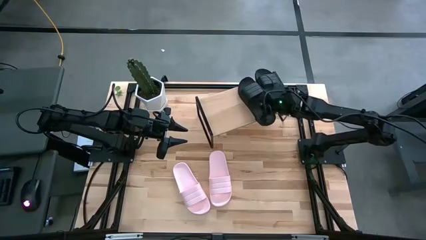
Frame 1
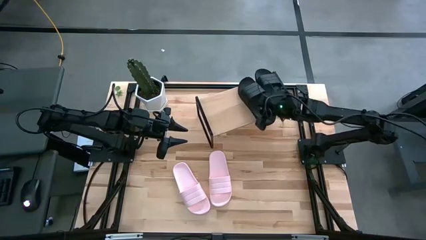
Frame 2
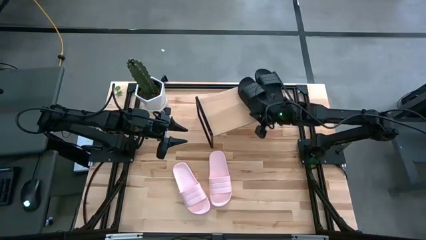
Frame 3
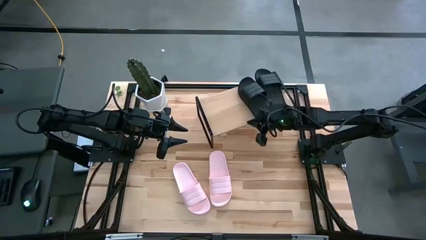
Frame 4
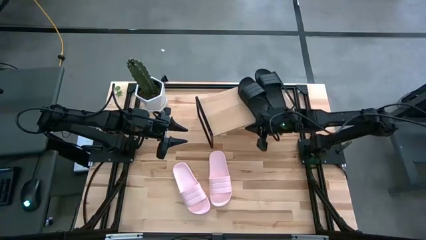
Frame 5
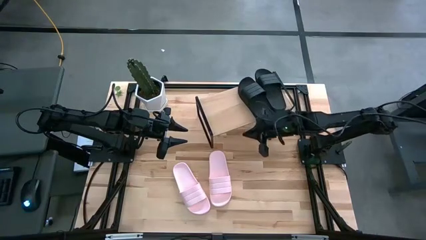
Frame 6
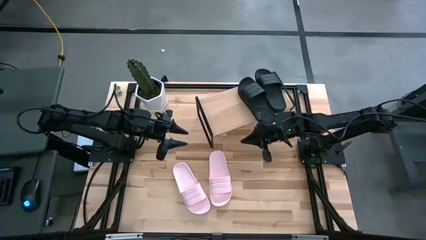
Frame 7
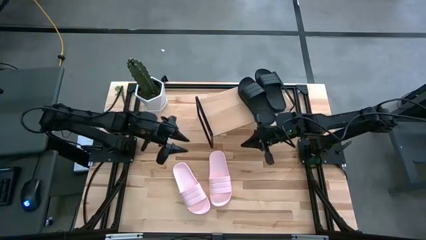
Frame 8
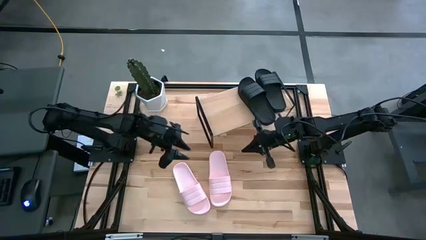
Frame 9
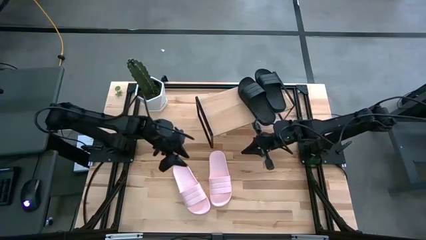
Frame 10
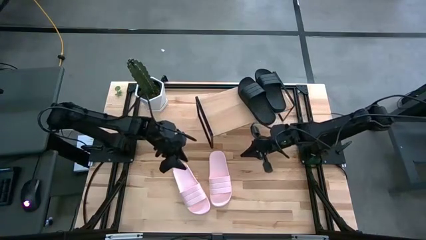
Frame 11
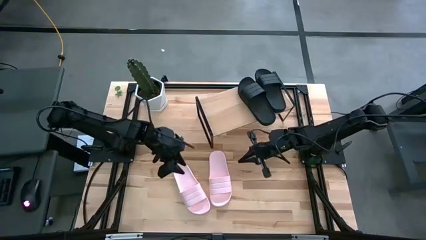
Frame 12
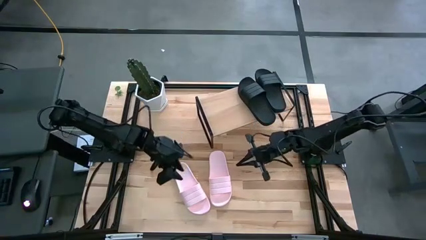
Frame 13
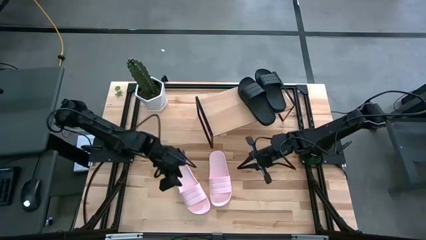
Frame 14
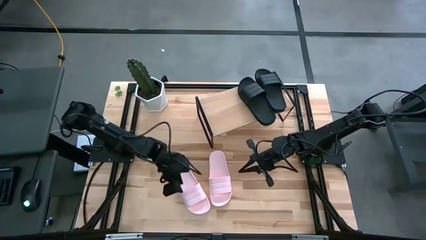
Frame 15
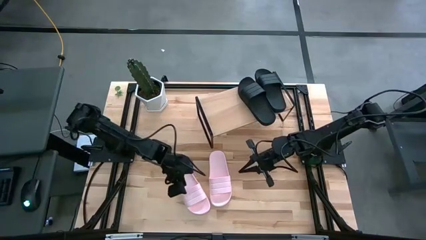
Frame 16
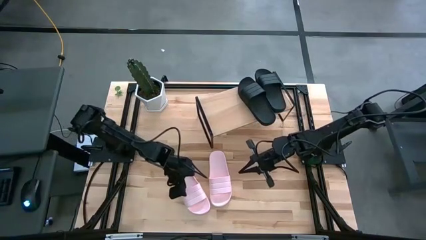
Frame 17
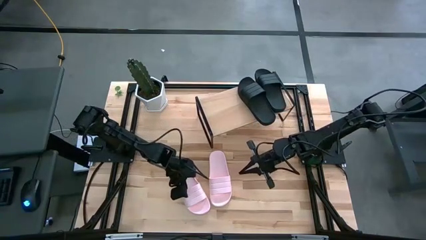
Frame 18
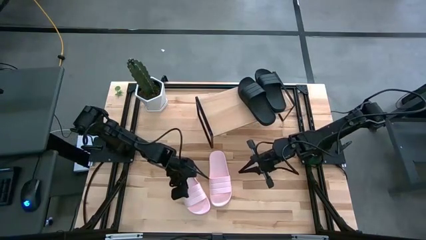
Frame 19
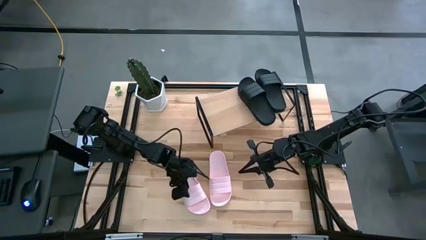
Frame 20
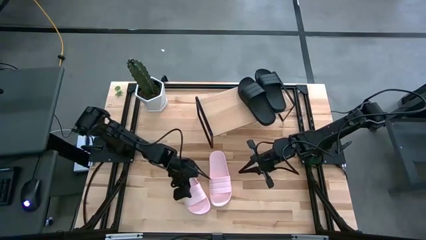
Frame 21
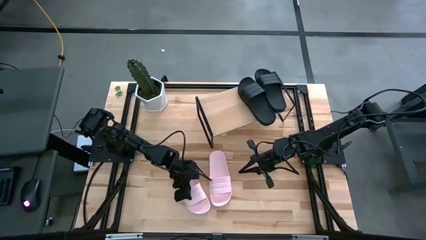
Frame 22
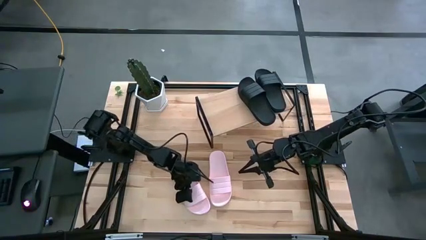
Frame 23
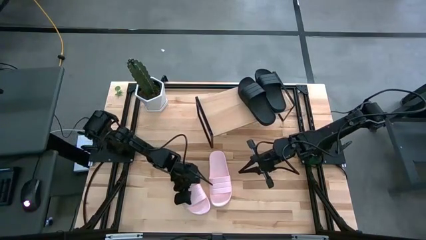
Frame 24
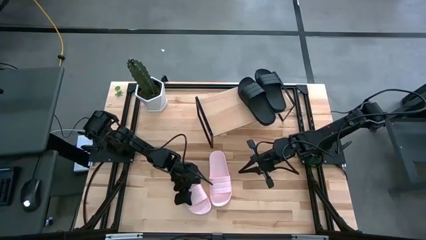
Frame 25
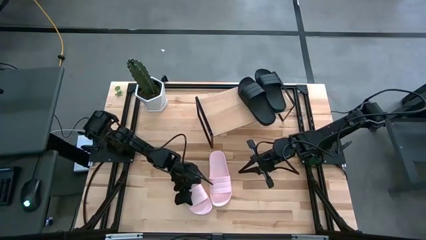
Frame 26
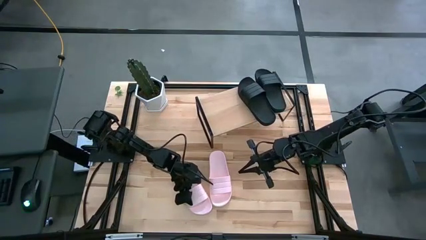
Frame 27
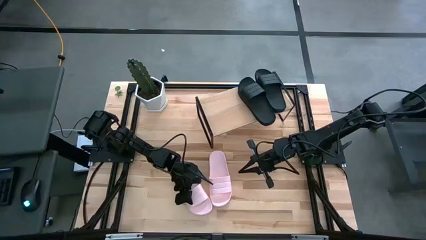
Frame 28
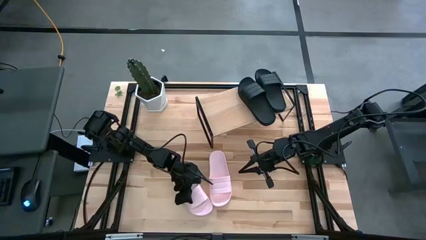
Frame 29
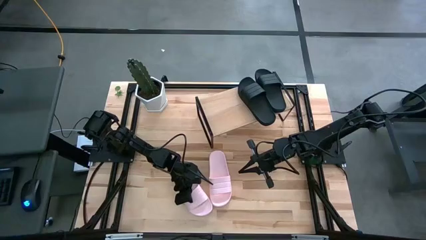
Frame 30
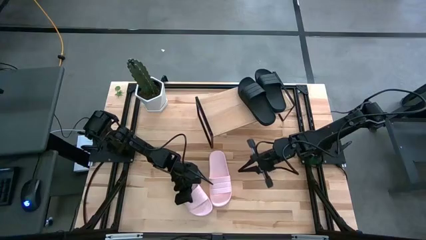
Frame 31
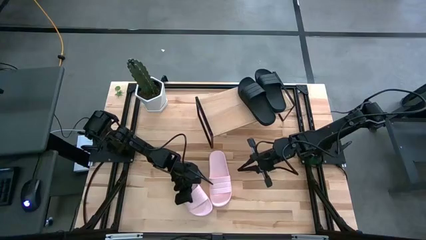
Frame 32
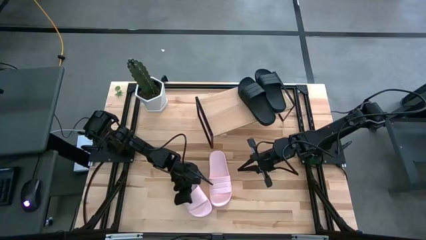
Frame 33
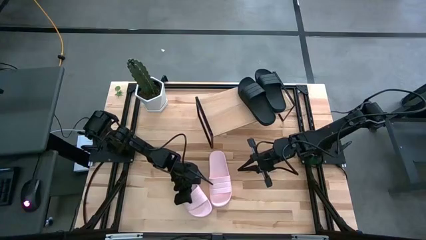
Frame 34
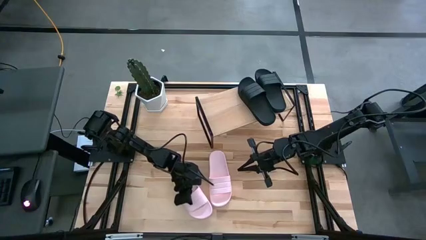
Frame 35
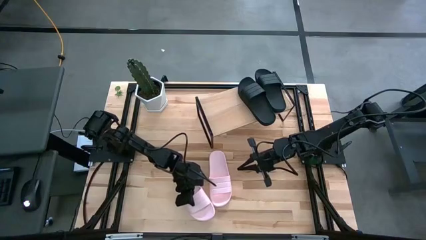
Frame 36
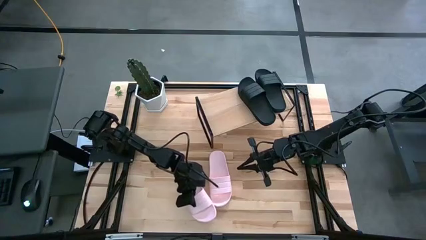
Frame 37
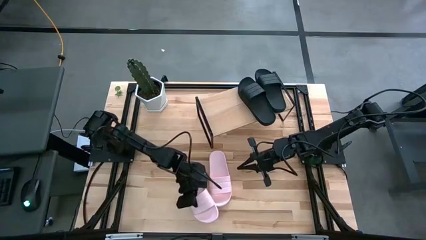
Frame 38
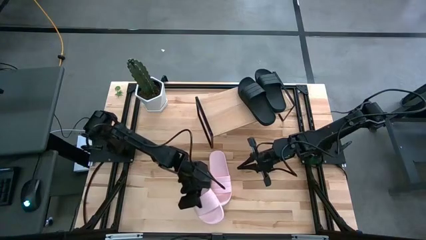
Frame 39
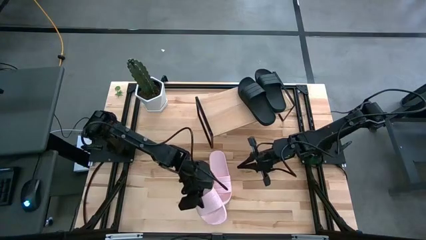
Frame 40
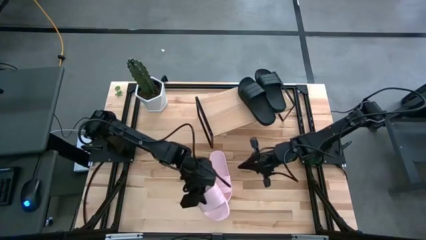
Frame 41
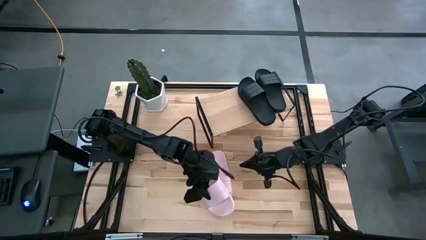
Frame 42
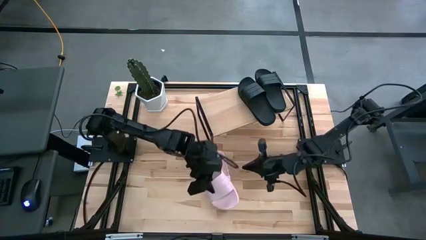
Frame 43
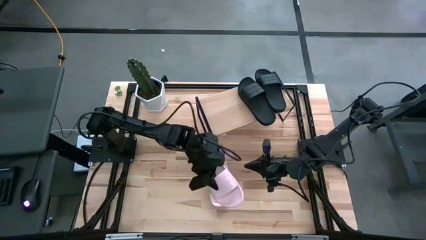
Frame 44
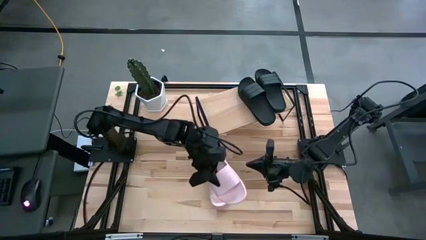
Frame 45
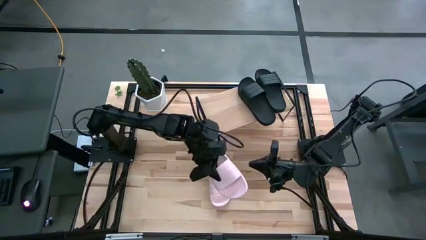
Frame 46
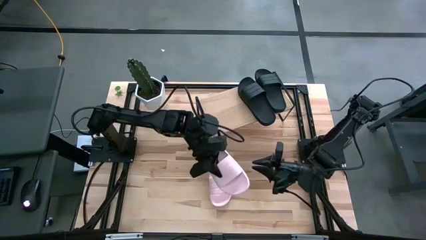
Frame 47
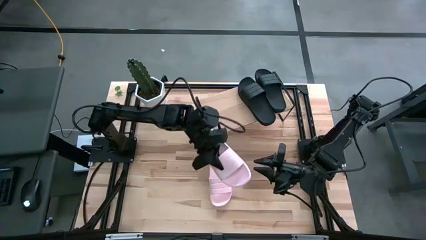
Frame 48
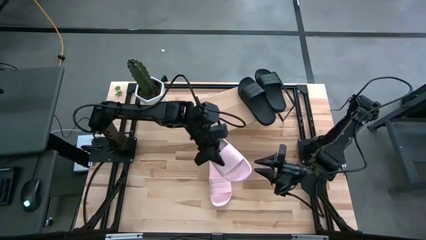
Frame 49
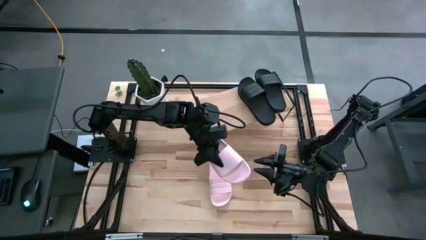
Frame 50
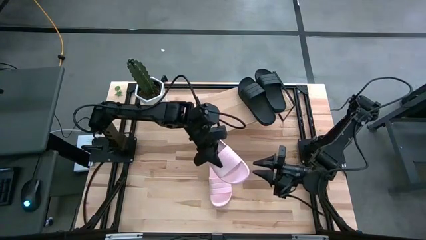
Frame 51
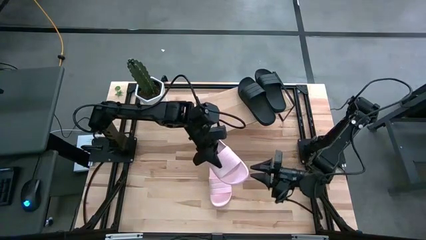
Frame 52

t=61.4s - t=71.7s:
Task: Pick and place slides into the shelf
Put the left pink slide on the shelf
